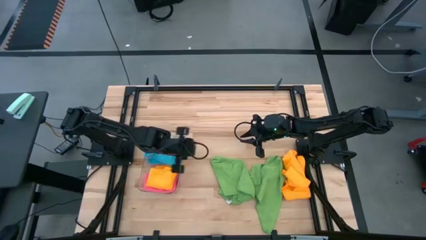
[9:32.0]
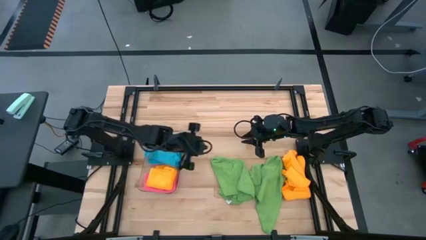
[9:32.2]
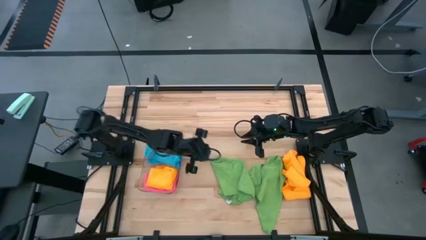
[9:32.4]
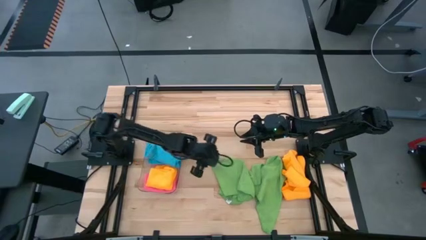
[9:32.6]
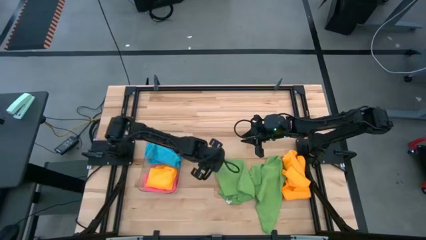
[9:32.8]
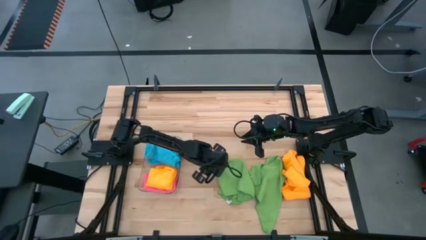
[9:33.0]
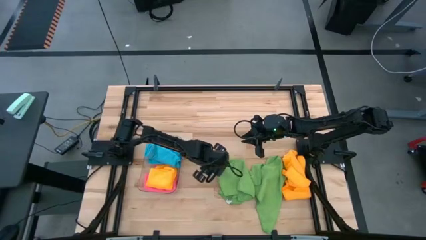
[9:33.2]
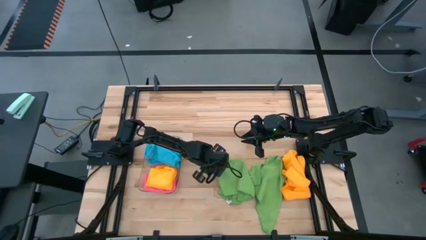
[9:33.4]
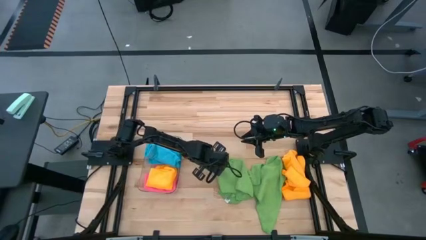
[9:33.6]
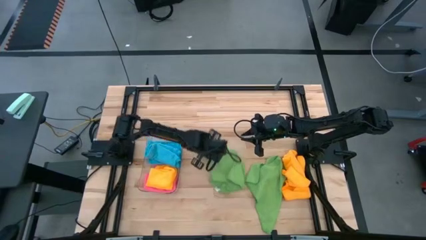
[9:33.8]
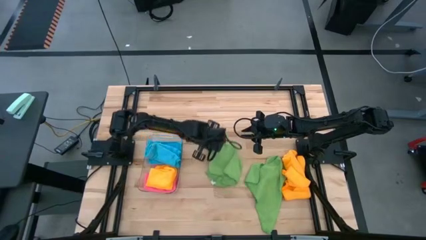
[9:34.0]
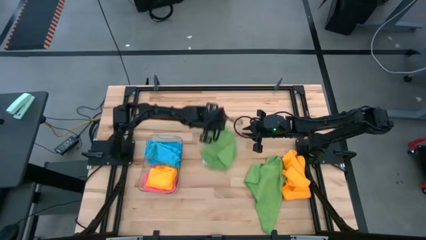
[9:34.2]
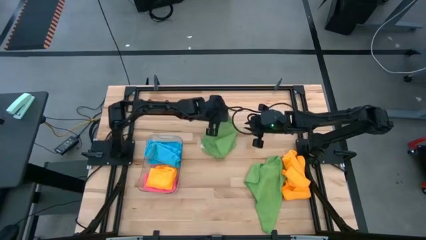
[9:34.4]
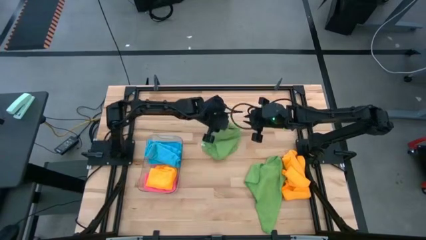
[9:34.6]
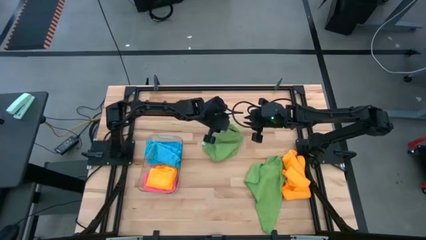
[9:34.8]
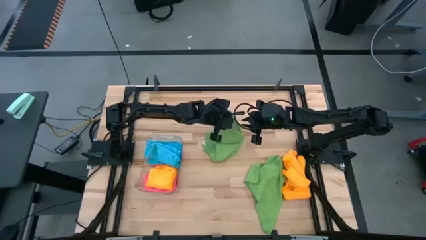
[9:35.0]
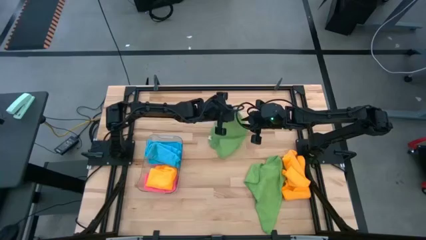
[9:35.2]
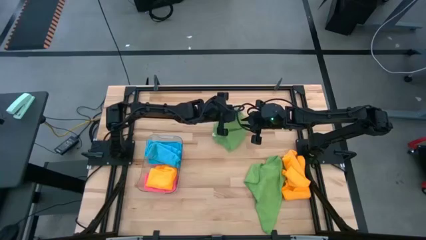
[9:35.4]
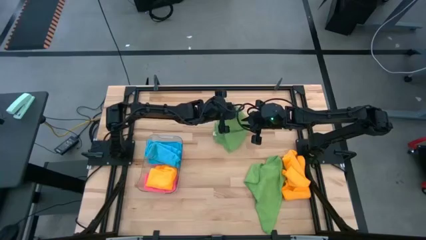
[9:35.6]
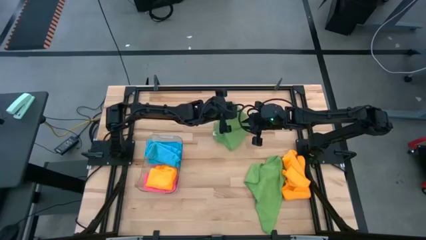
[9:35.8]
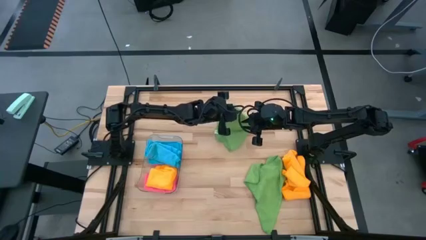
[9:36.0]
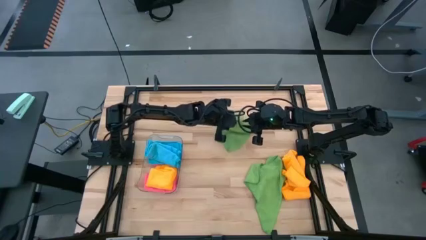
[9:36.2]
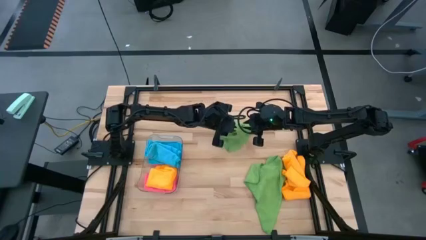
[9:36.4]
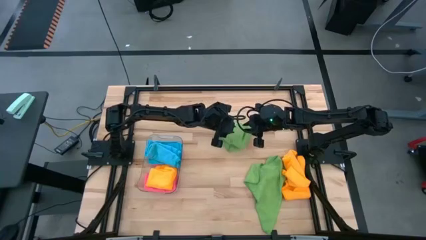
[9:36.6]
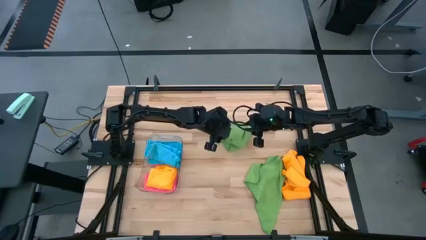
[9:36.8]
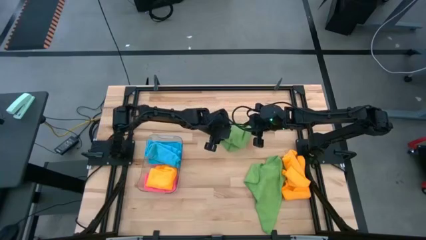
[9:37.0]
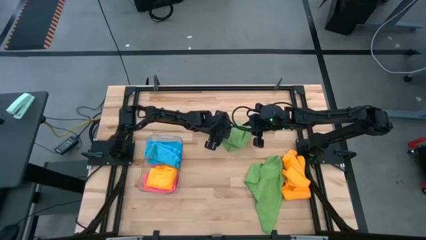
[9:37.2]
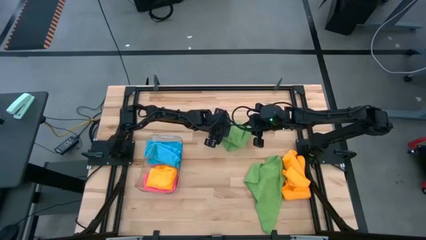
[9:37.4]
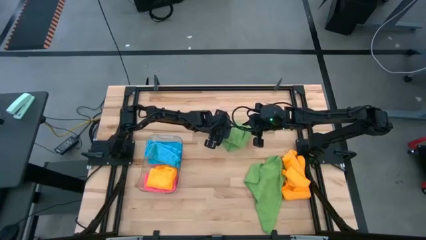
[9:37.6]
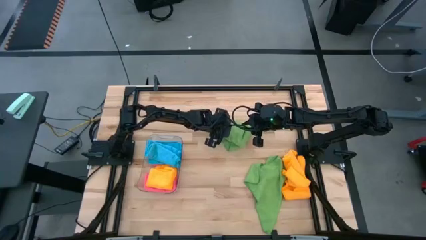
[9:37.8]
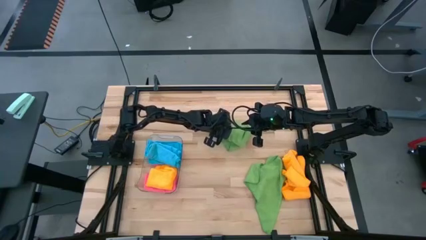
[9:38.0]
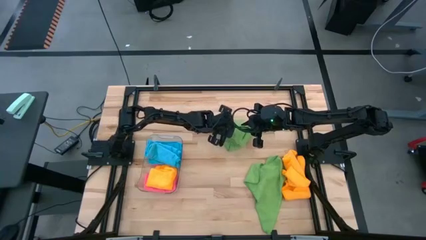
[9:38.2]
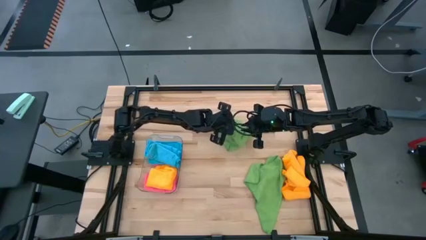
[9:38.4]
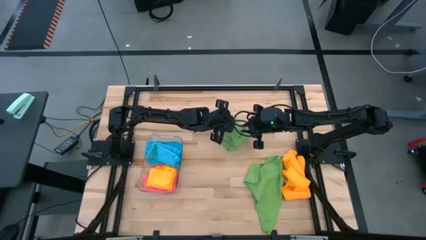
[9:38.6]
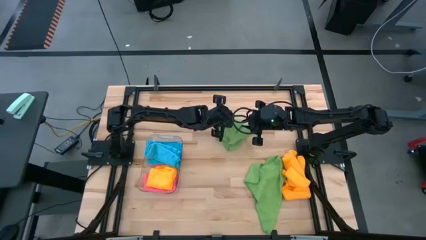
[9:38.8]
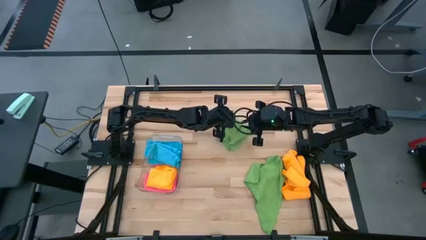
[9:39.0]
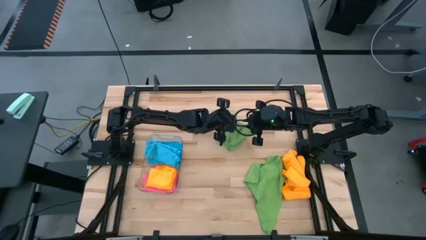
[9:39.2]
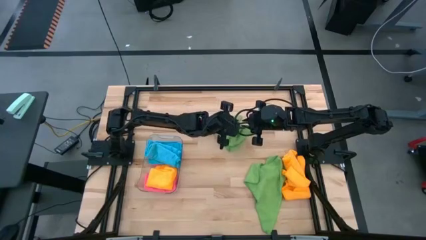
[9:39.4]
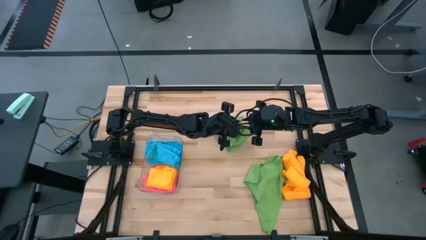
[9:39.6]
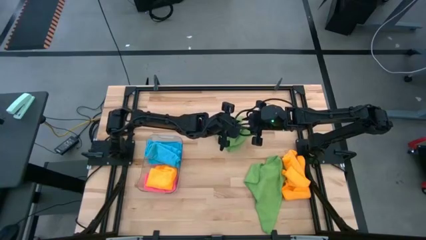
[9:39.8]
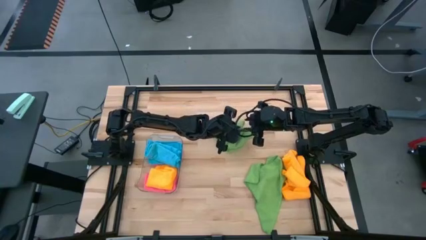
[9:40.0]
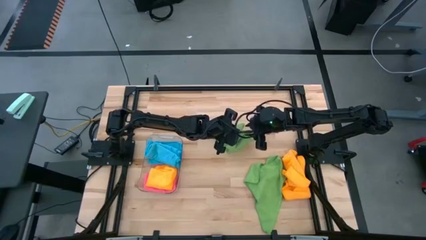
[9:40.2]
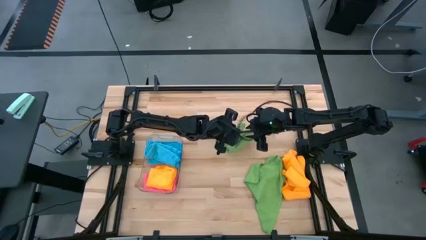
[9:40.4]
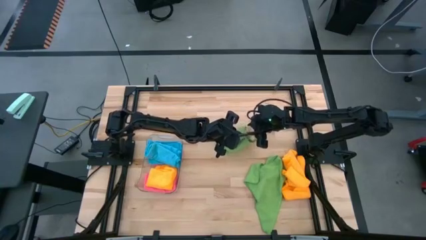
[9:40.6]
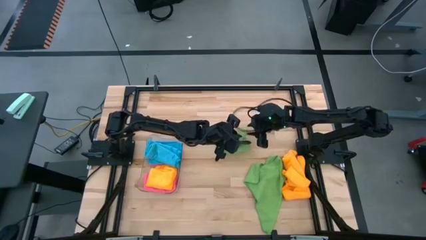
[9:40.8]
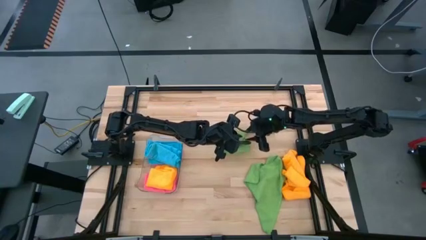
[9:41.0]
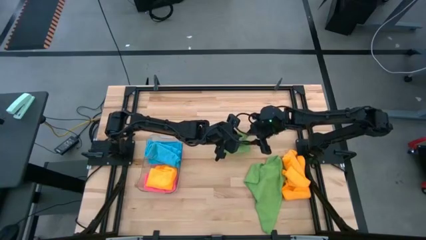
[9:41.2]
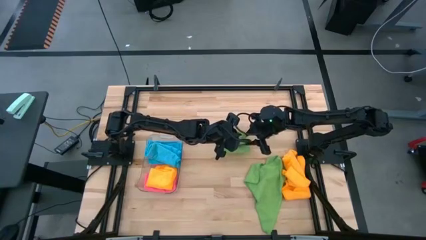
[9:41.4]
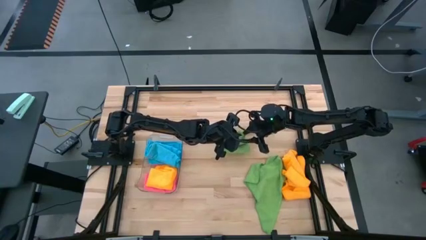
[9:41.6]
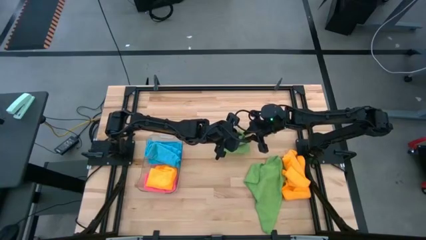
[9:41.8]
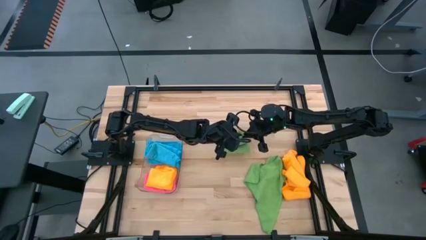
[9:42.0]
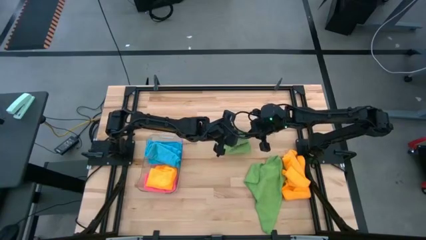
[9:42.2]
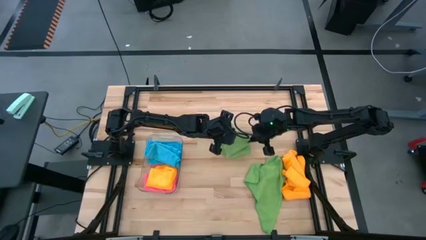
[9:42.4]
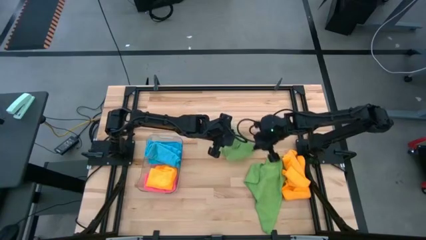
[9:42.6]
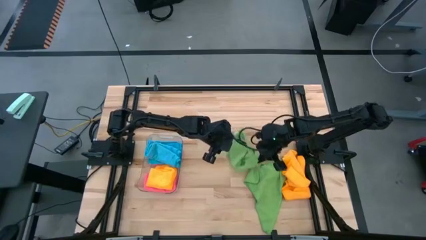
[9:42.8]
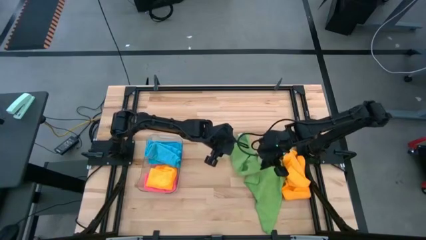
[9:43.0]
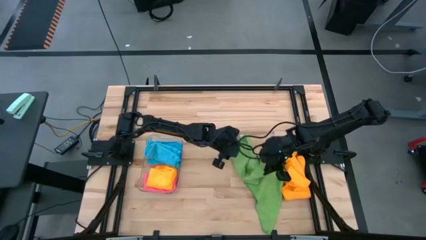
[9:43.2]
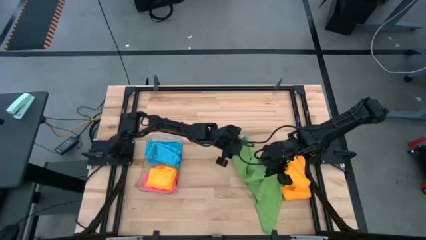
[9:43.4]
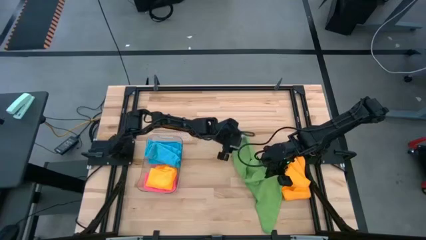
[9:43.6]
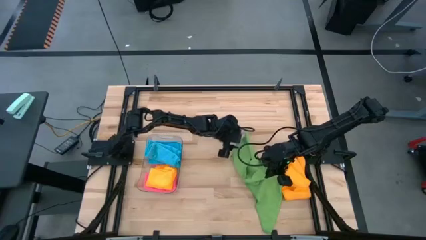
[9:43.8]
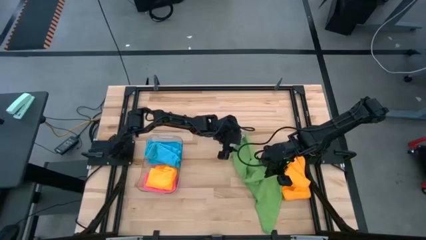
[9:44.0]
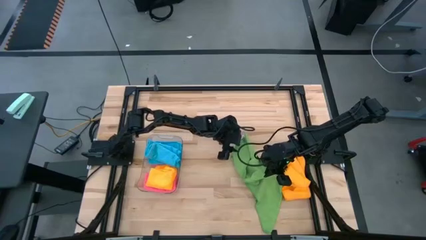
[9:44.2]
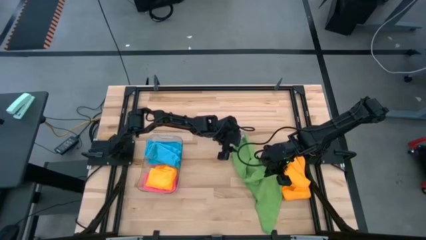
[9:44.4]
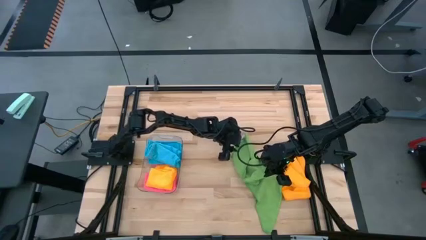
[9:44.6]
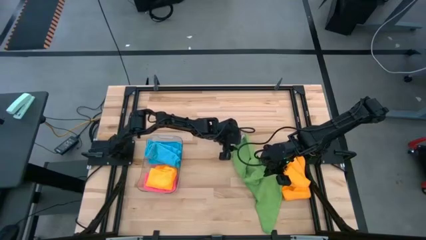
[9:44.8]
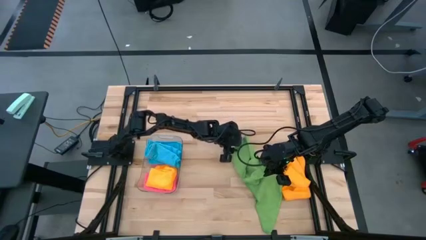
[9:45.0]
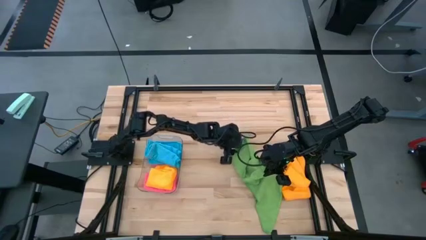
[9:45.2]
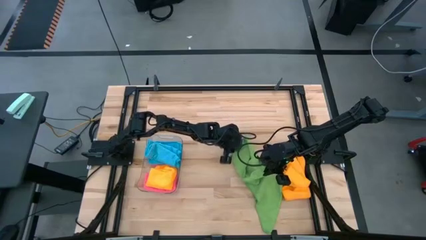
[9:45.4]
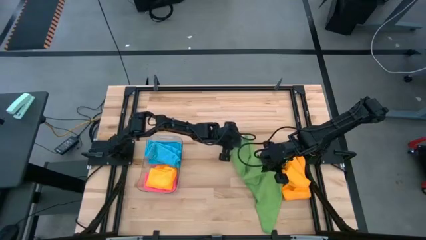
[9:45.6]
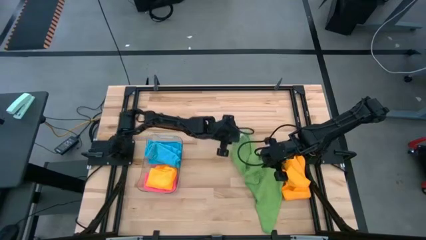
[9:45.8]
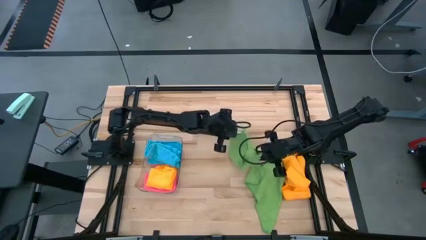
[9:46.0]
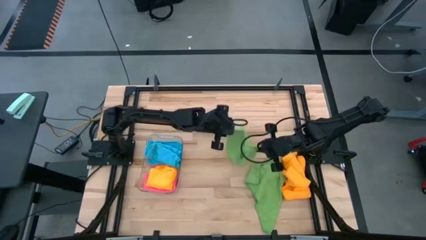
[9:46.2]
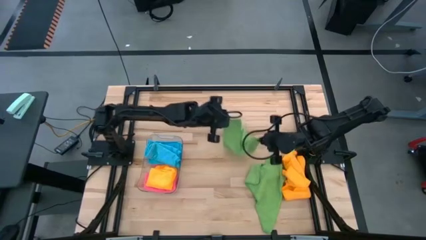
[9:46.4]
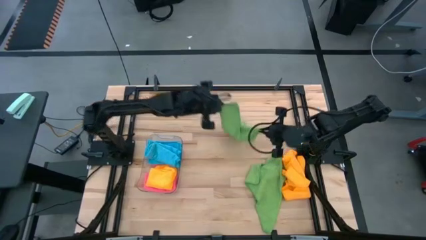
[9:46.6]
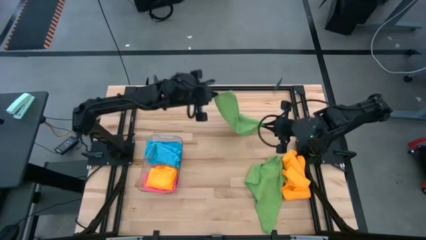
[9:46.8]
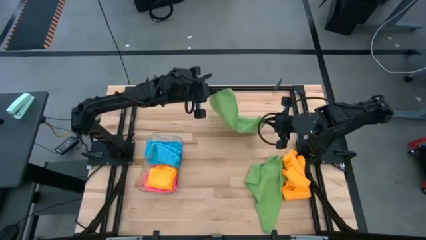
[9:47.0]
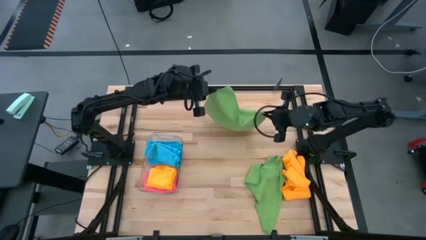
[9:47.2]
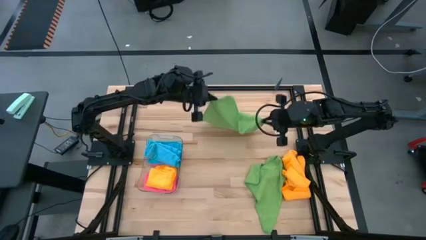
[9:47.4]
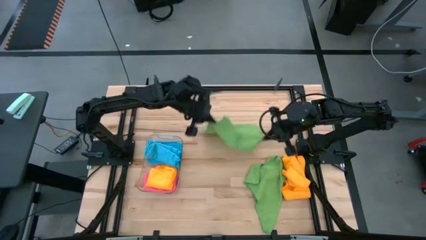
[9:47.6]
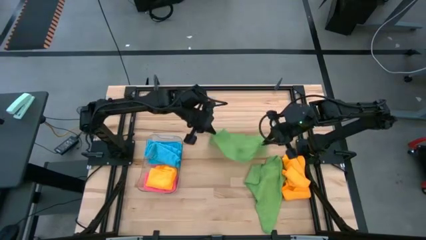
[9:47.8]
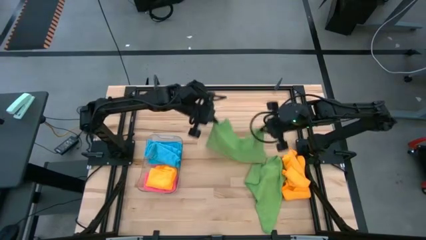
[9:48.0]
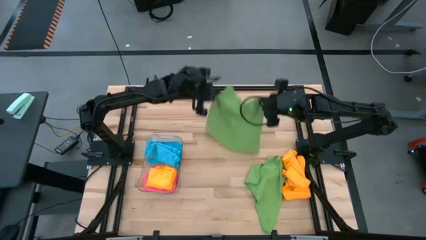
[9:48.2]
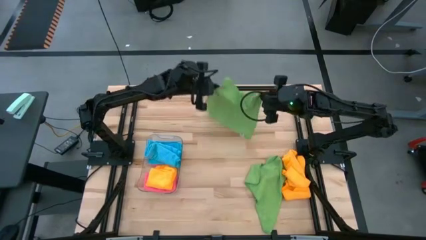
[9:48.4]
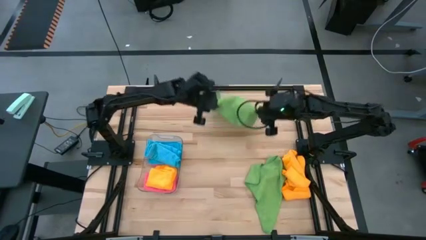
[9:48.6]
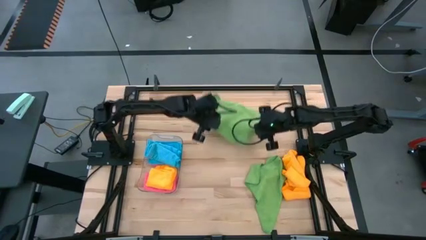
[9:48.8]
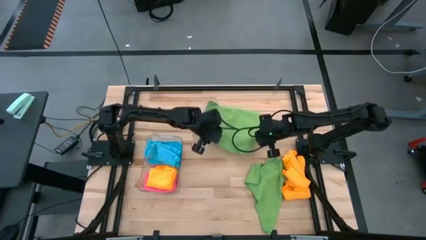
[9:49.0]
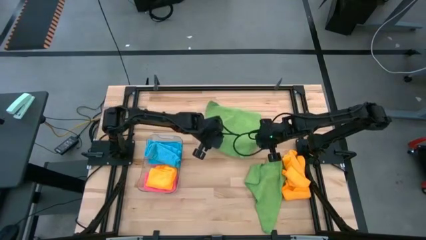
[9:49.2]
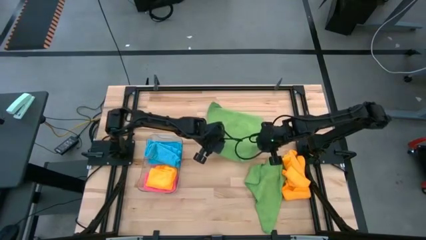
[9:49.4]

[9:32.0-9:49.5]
Task: Fold microfiber towels
Fold the left green microfiber cloth
